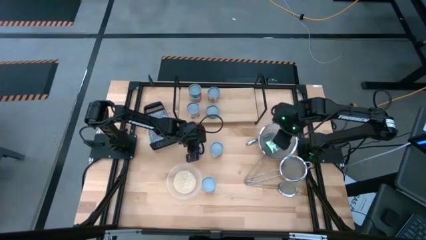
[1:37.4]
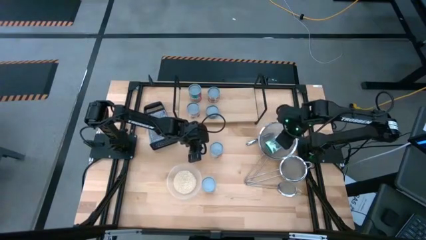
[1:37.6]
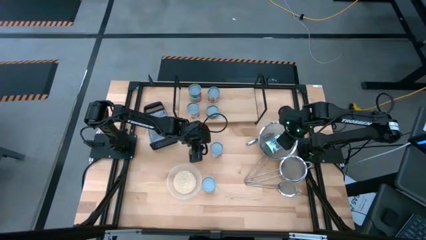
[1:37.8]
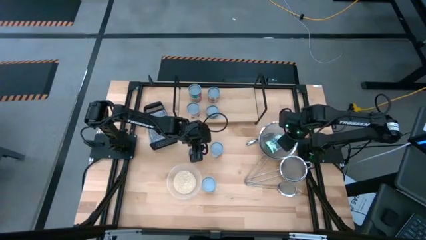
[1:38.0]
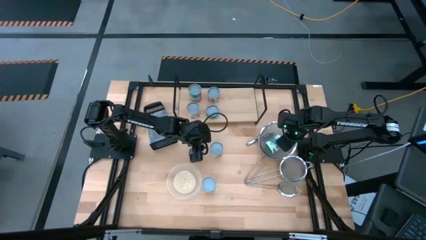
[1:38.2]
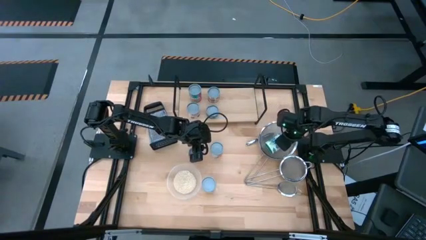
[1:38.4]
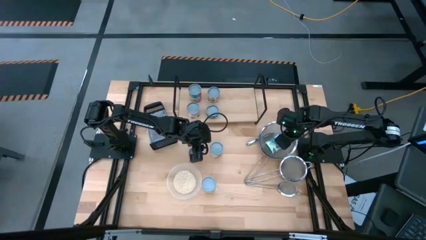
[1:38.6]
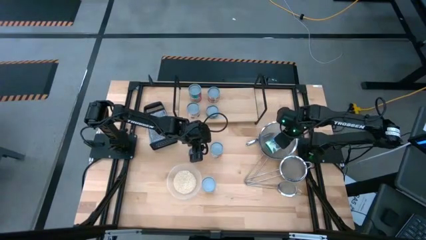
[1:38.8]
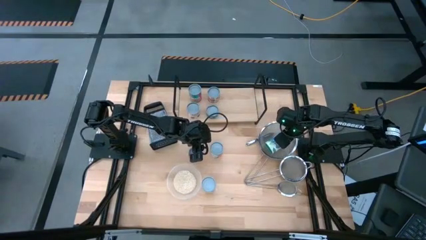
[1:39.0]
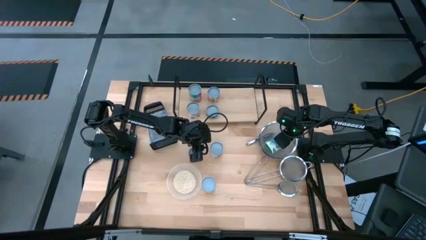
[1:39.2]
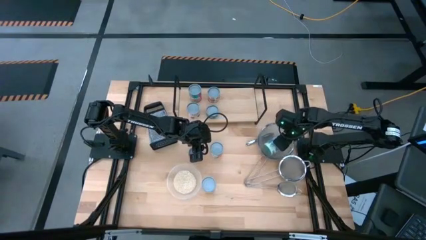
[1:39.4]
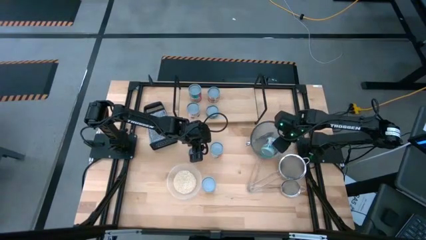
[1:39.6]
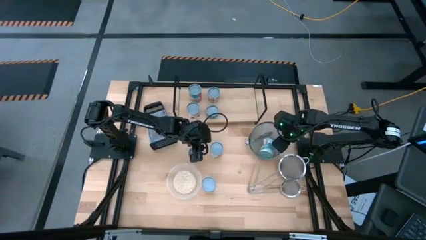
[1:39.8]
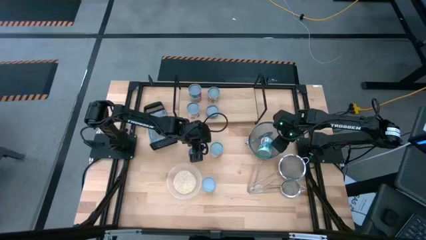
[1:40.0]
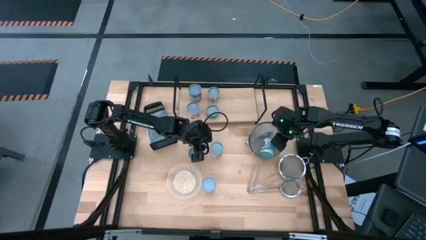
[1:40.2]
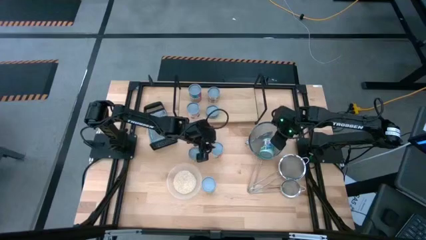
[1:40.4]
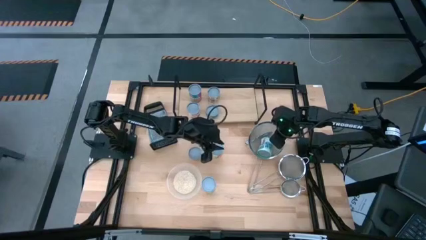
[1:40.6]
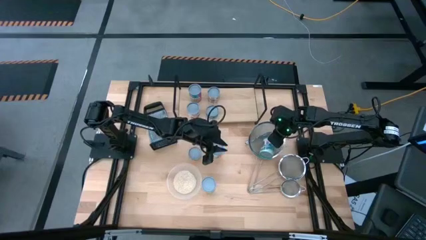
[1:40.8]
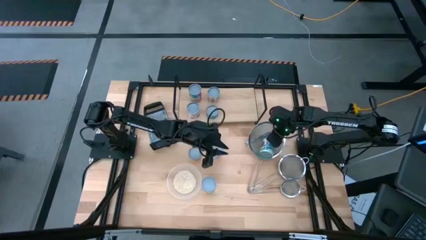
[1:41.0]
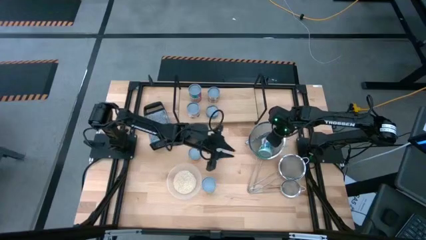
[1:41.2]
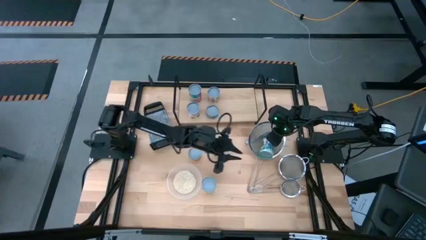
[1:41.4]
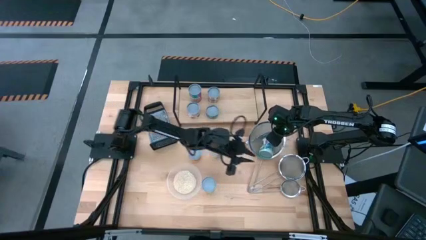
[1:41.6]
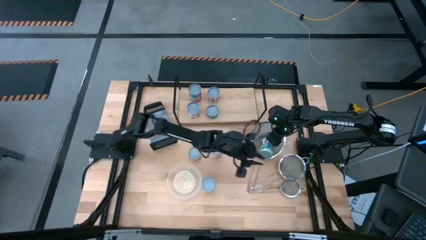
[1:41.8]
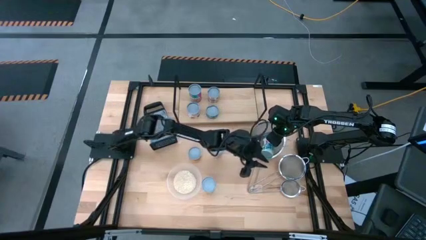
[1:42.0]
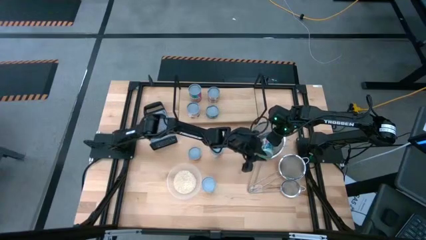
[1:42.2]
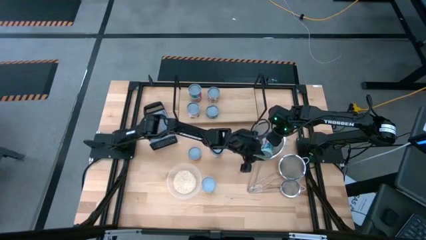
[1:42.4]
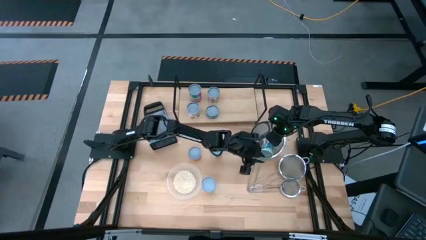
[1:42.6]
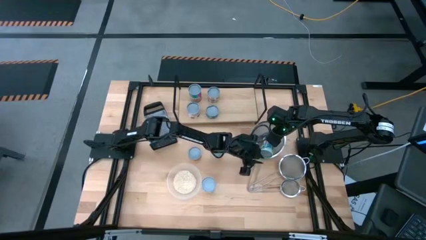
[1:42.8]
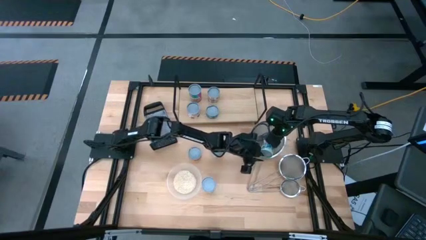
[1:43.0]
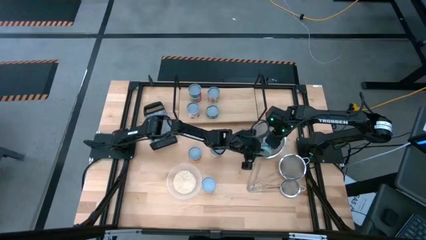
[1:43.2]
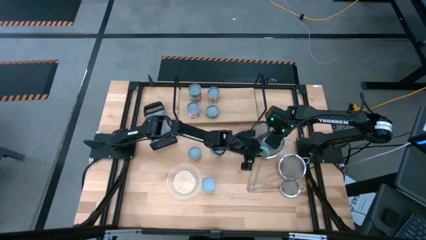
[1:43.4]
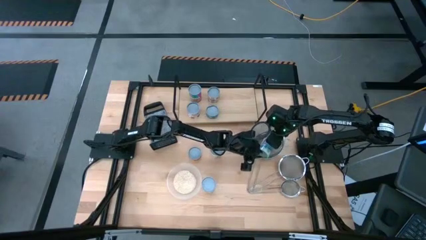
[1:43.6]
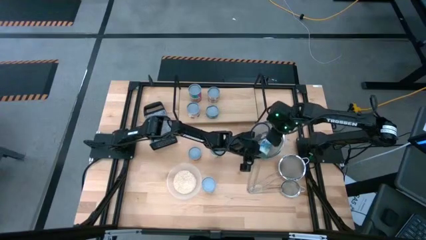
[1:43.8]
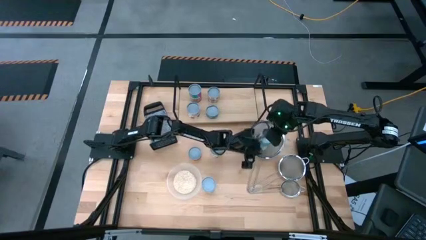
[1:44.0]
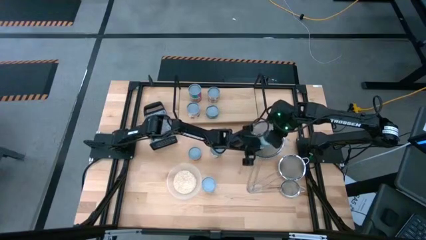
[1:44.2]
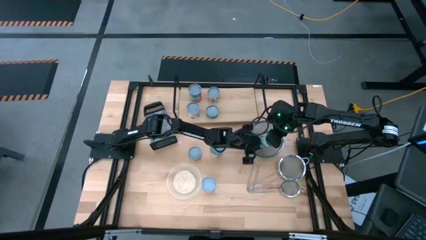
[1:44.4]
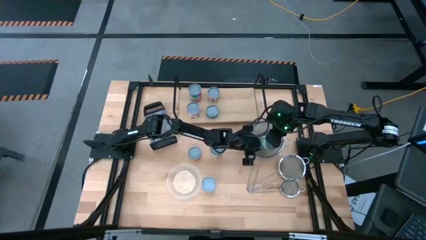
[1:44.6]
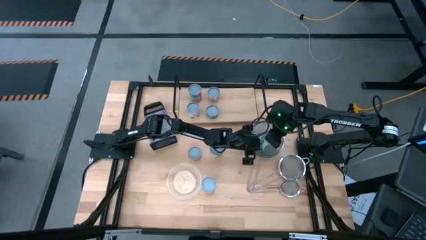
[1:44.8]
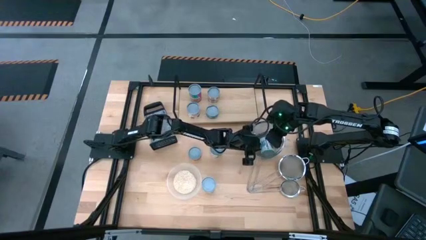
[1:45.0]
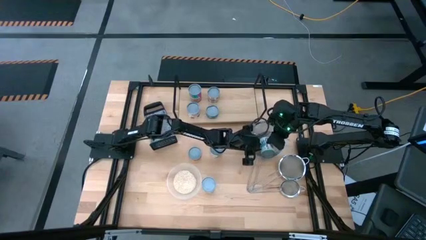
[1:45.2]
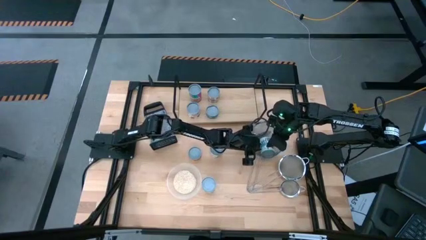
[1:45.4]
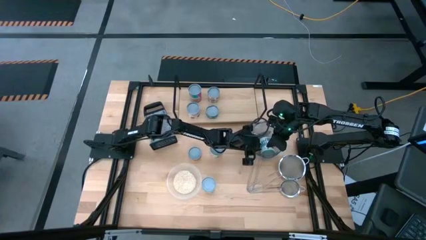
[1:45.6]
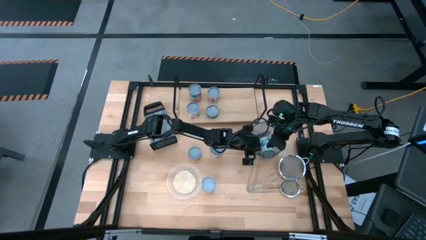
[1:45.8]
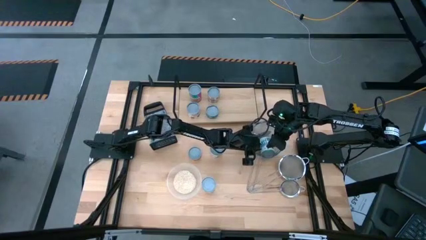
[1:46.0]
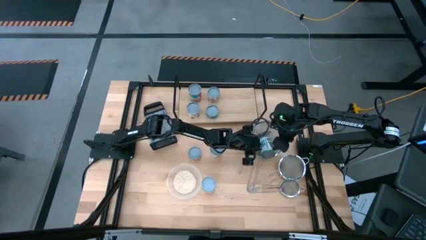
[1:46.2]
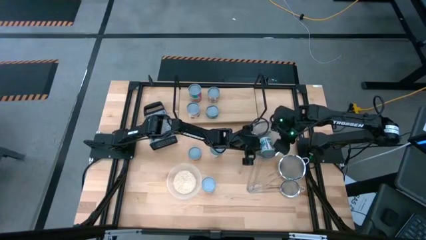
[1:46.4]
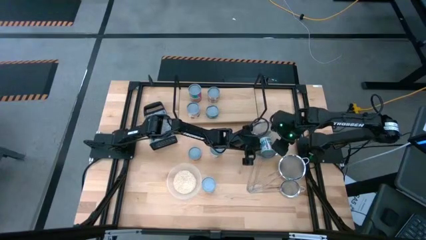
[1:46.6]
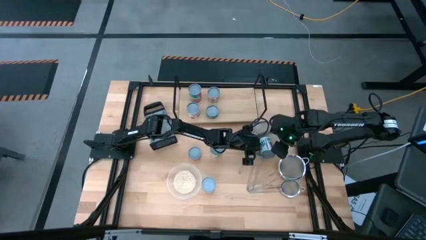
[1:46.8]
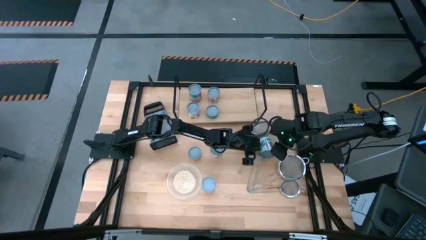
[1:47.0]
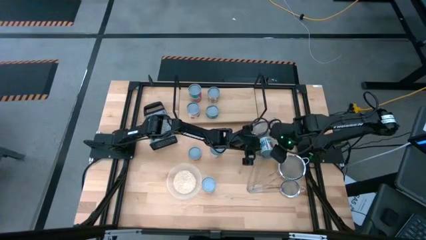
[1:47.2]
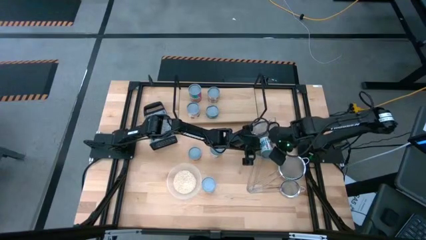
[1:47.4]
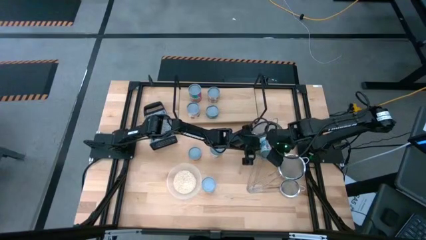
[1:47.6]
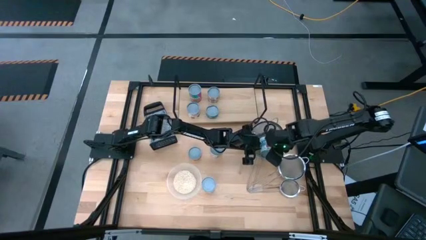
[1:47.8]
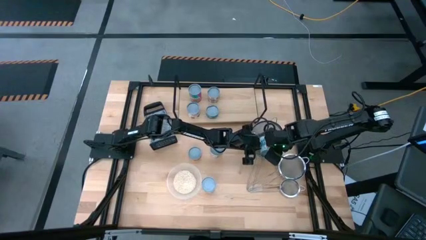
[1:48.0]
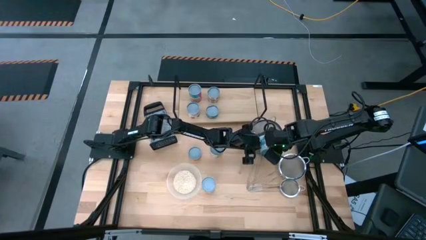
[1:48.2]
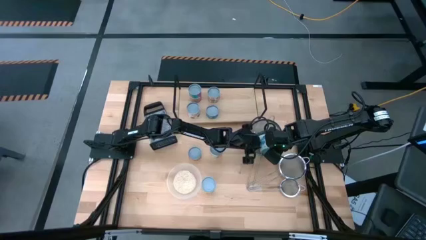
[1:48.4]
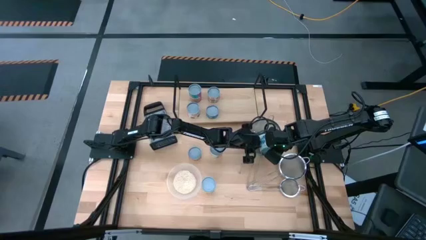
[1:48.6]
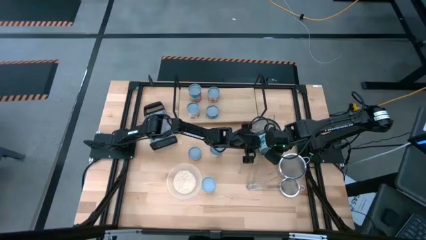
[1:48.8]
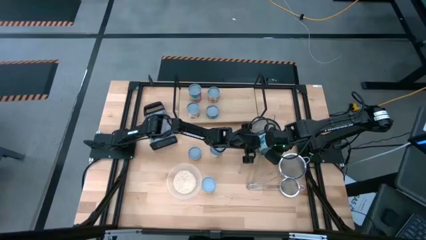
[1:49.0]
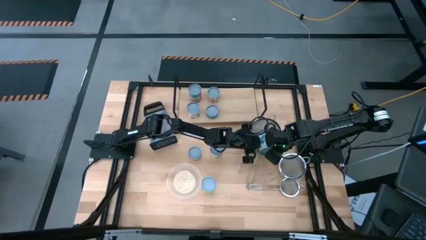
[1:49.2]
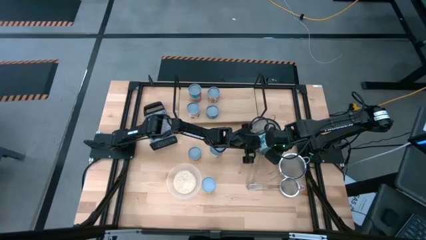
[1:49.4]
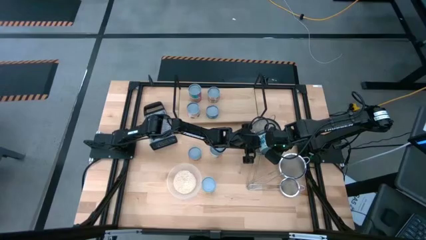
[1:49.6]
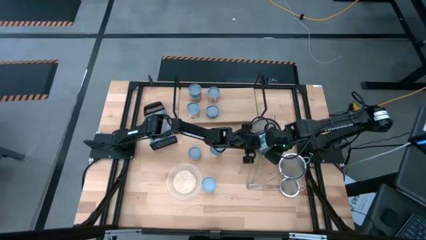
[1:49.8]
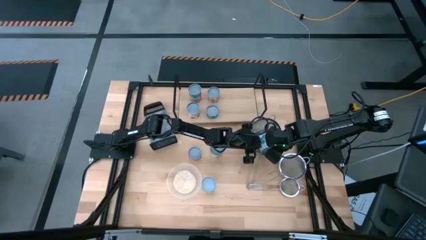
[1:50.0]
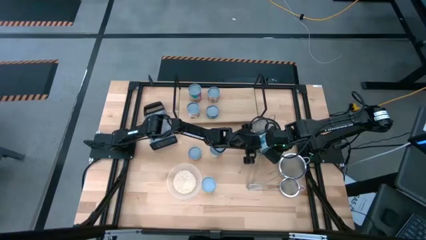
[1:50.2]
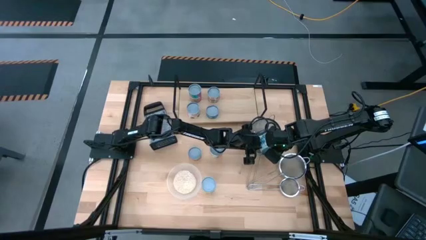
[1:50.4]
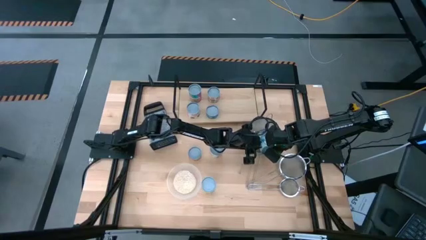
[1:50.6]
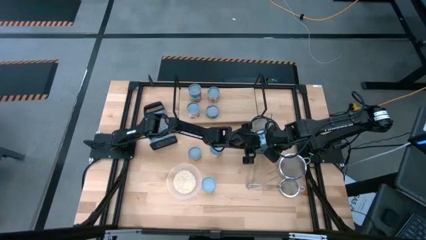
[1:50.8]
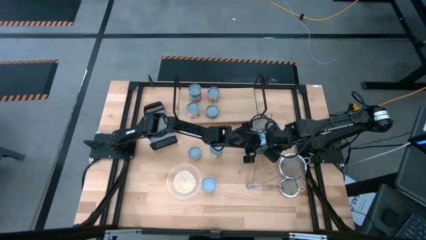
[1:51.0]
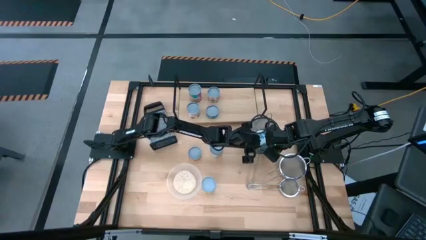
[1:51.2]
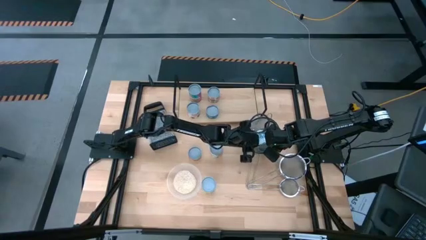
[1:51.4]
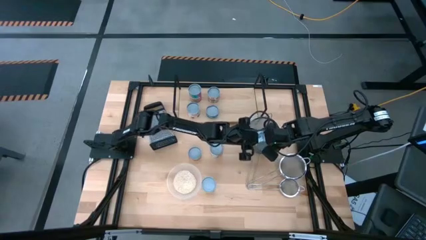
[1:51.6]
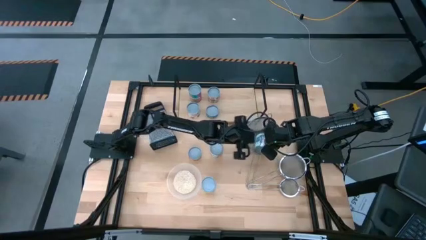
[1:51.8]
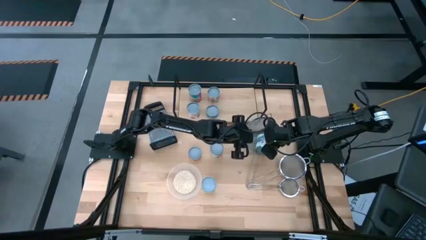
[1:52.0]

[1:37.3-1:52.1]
Task: Pick and place cans onto a shelf
Put the white mixed vegetables can on the shelf
